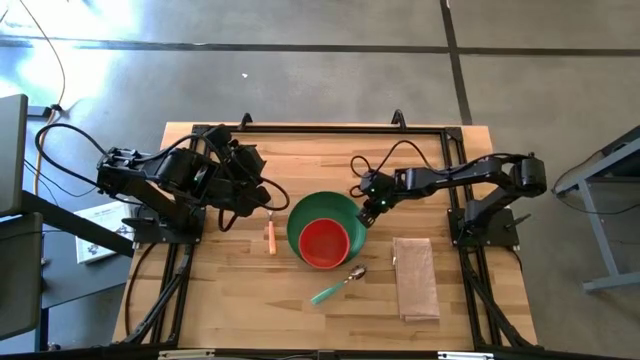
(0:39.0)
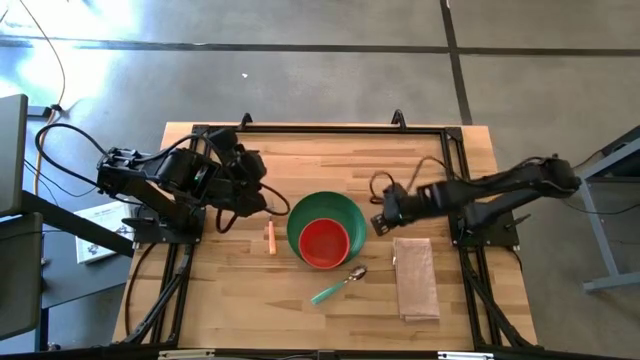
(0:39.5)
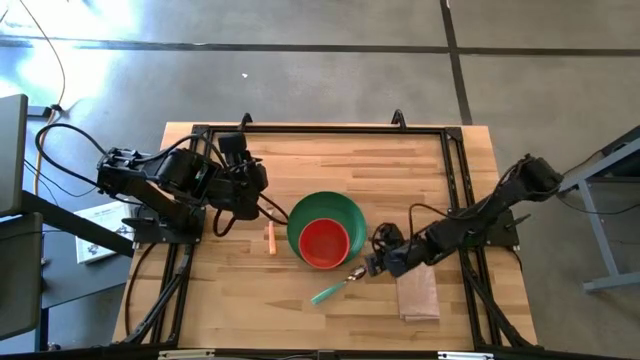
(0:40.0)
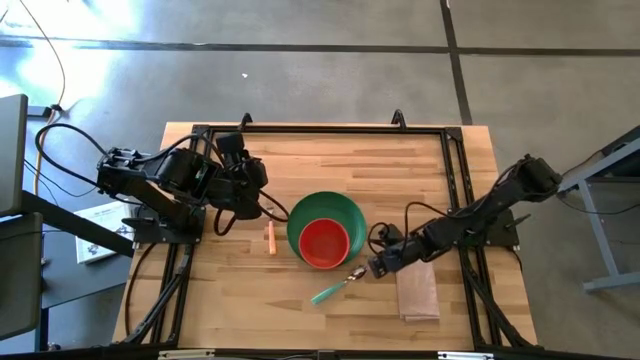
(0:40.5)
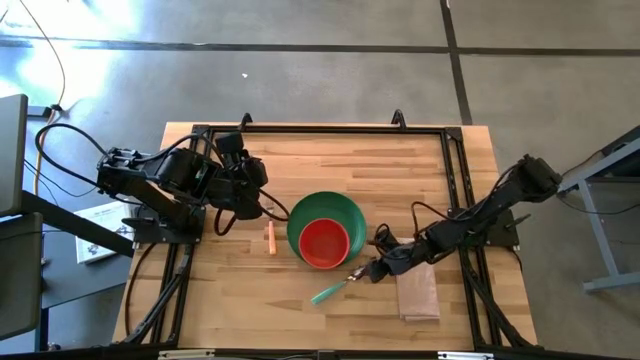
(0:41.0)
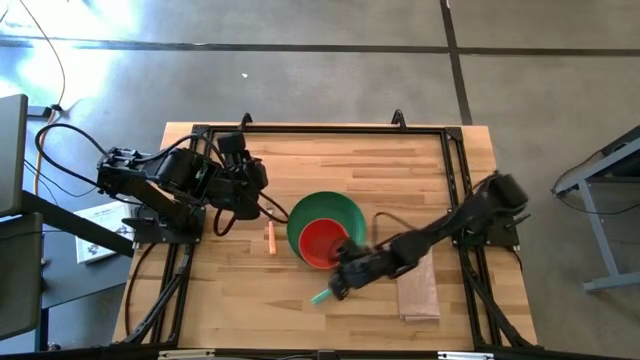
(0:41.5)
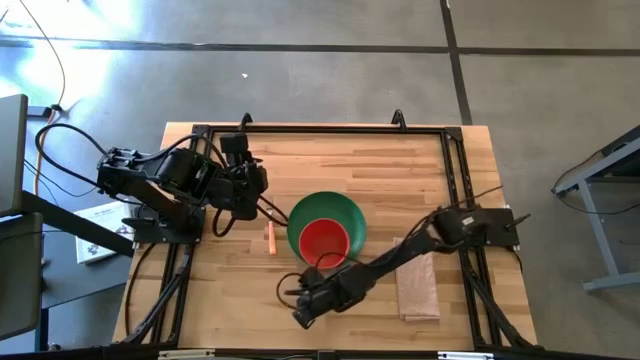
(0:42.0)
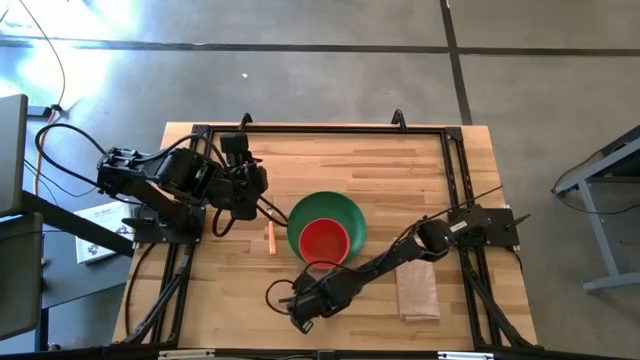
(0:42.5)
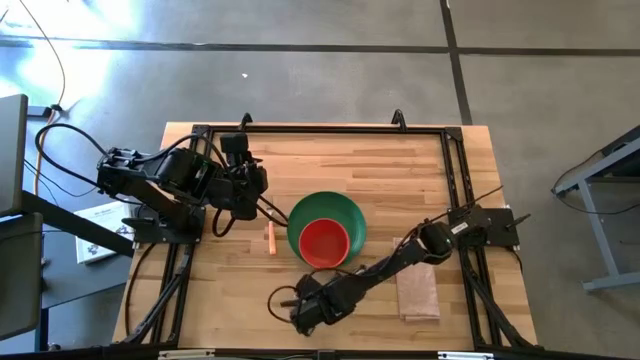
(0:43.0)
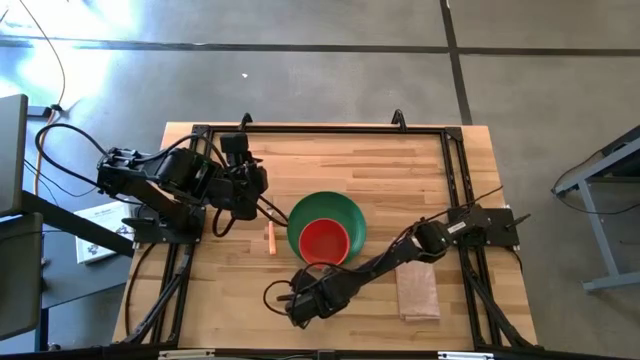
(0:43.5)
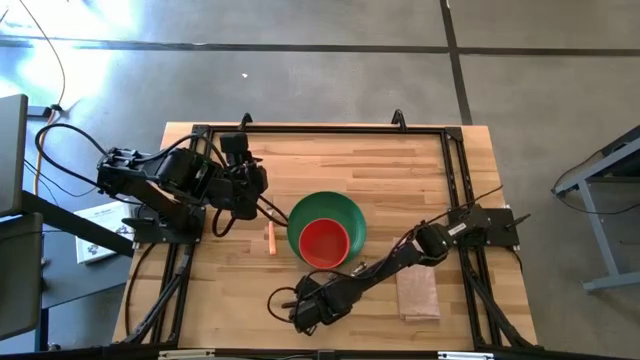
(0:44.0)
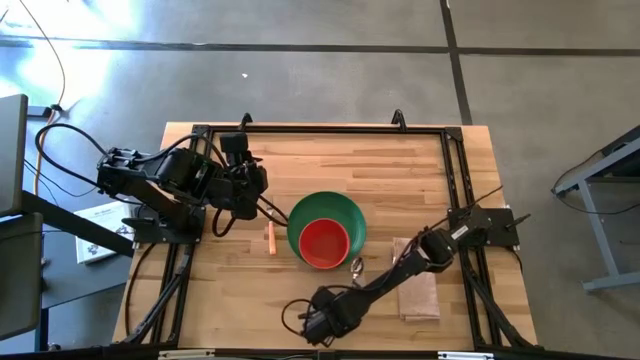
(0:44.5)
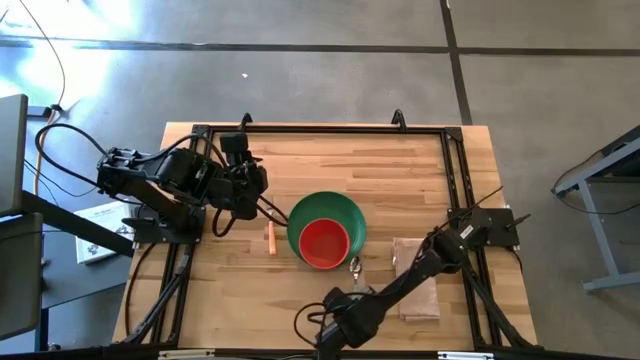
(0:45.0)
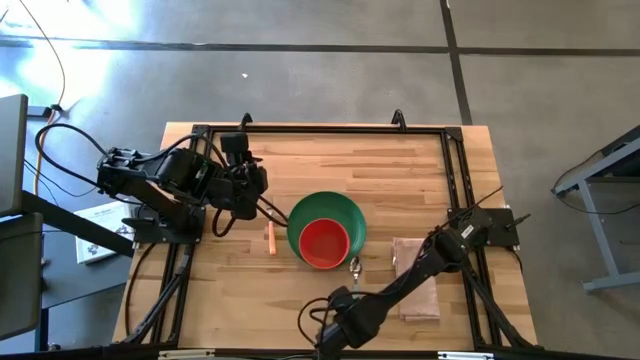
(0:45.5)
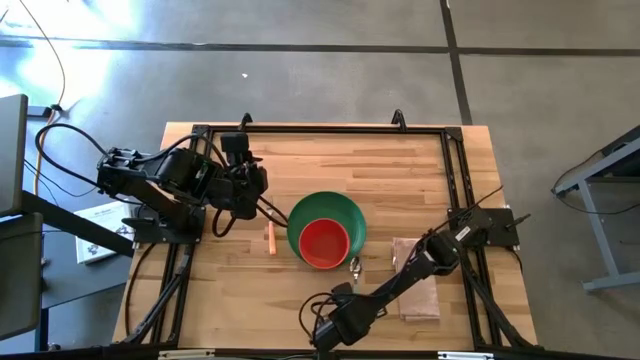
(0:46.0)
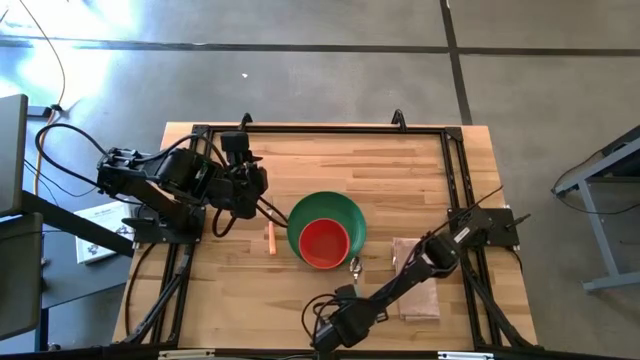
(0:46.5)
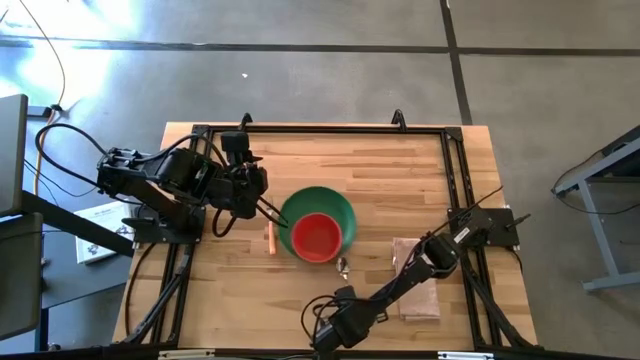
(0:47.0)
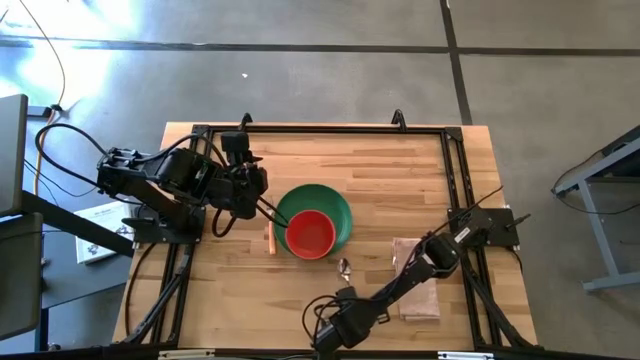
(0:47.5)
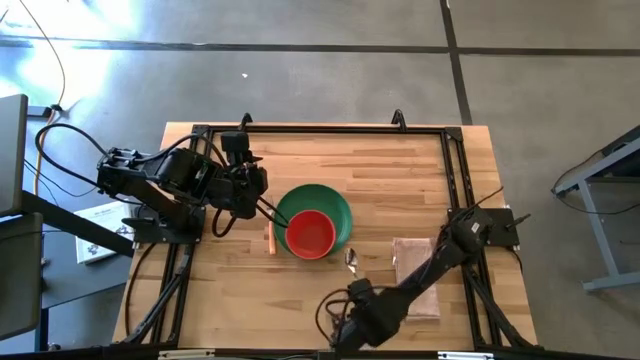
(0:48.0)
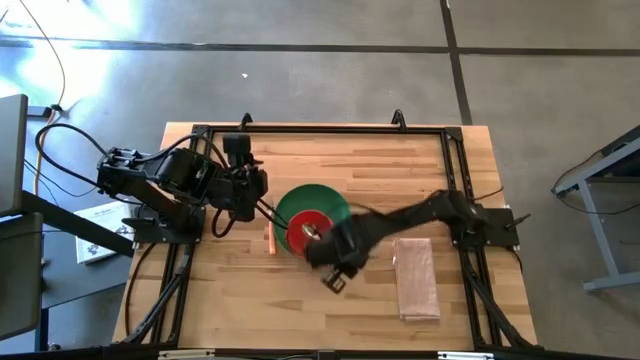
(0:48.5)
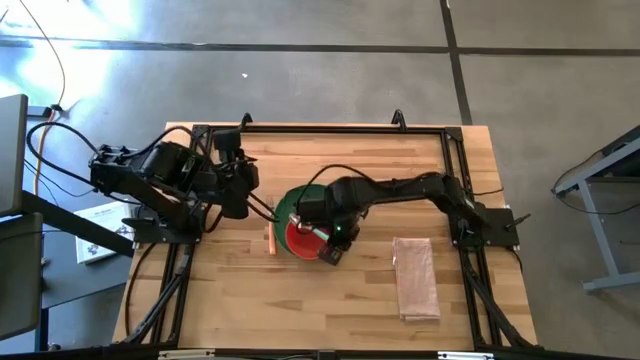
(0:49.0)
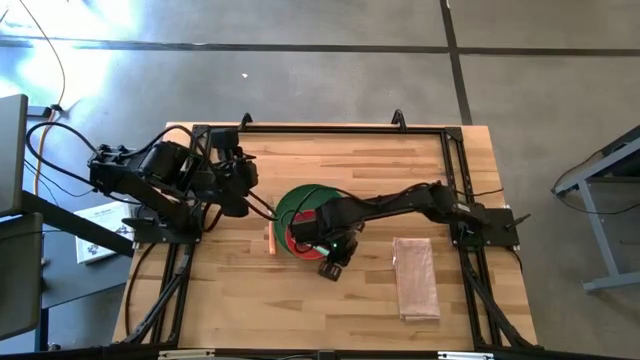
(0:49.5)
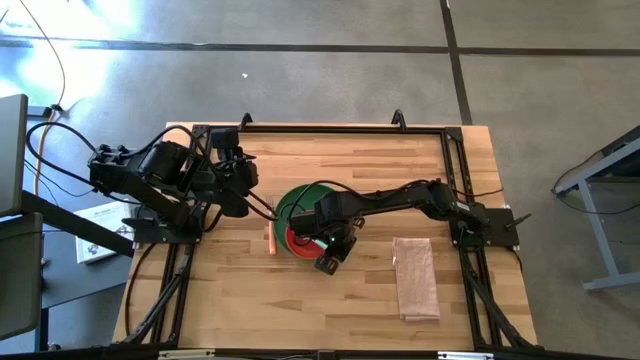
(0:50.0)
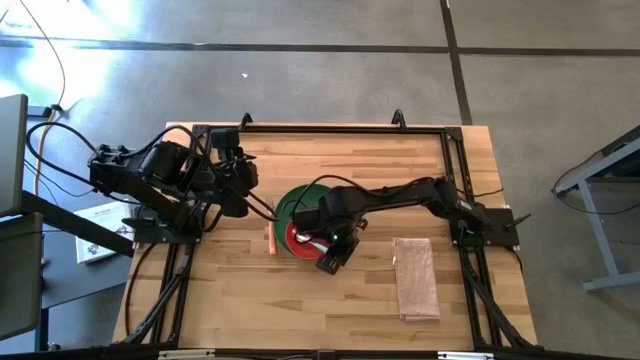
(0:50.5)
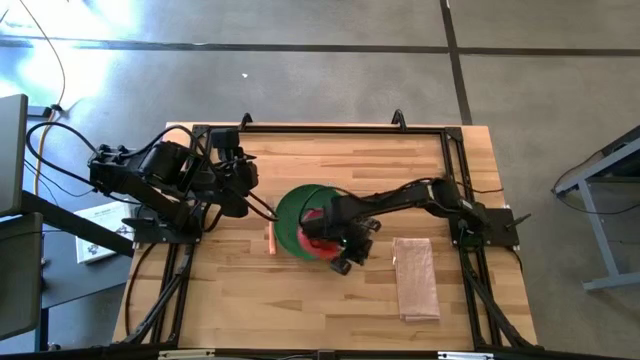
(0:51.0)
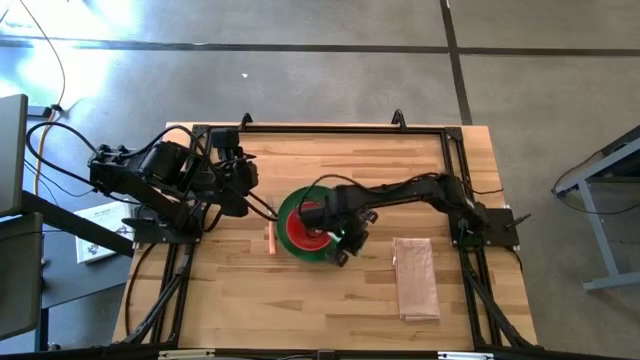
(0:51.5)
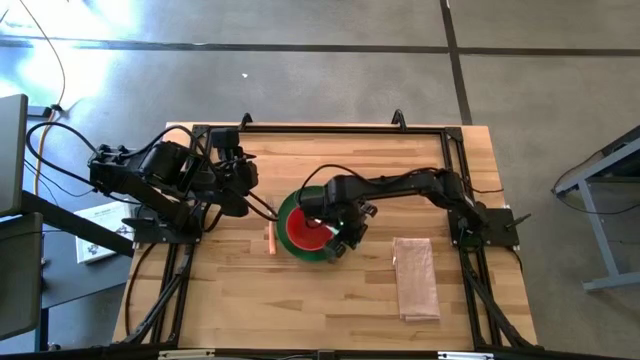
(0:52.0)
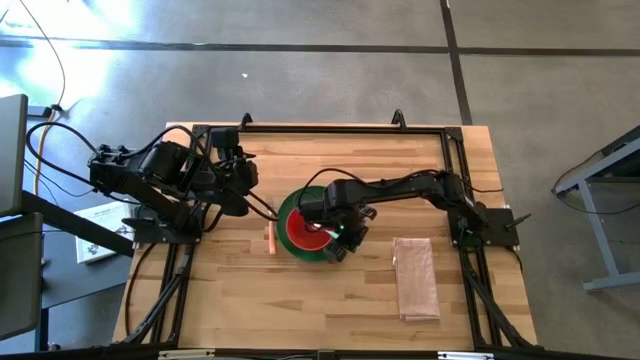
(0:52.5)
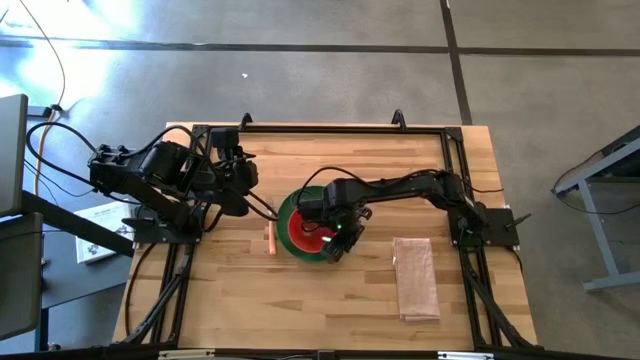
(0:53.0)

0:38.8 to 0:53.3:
Task: Set table place
Put the spoon into the orange bowl

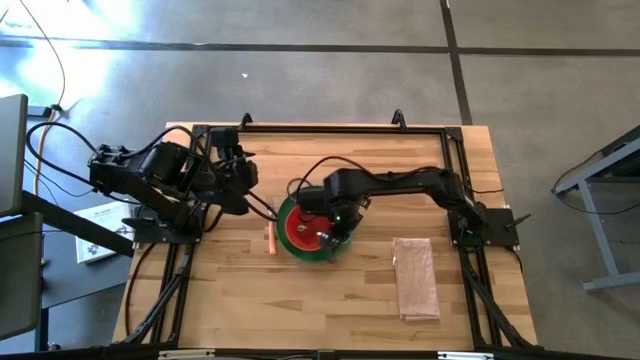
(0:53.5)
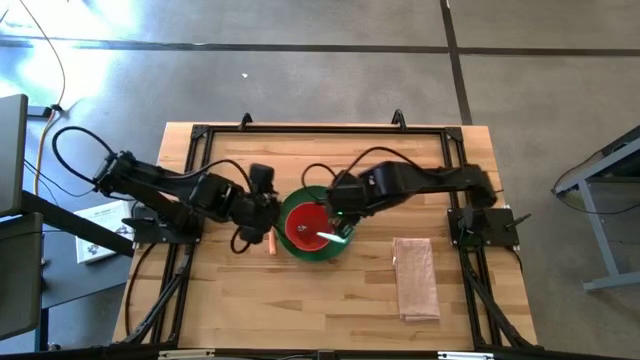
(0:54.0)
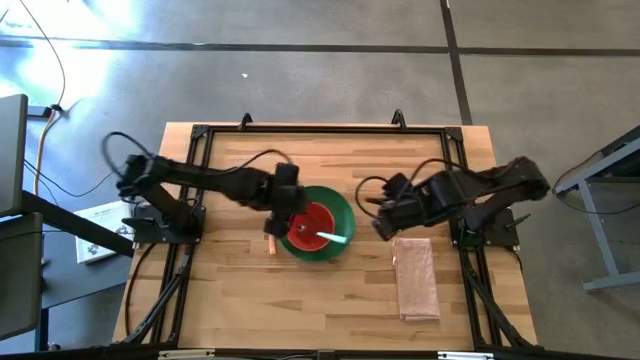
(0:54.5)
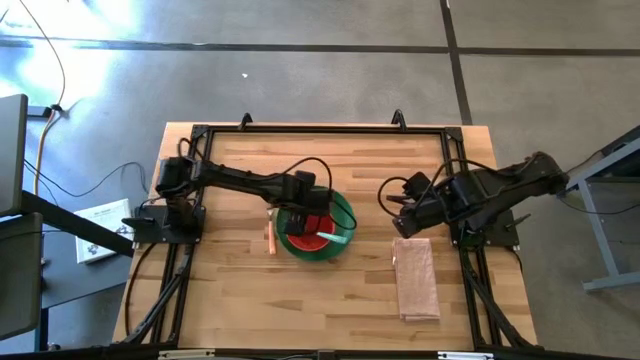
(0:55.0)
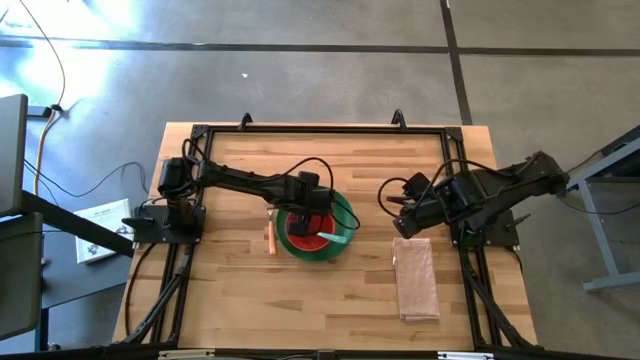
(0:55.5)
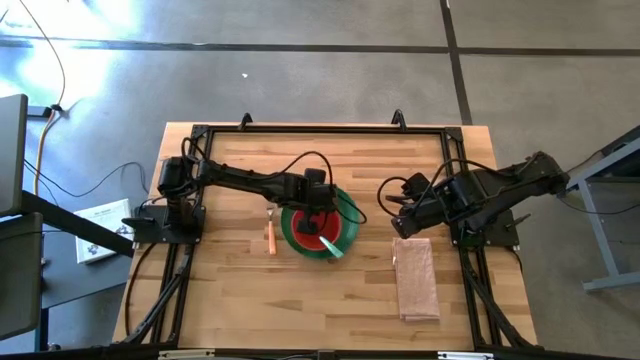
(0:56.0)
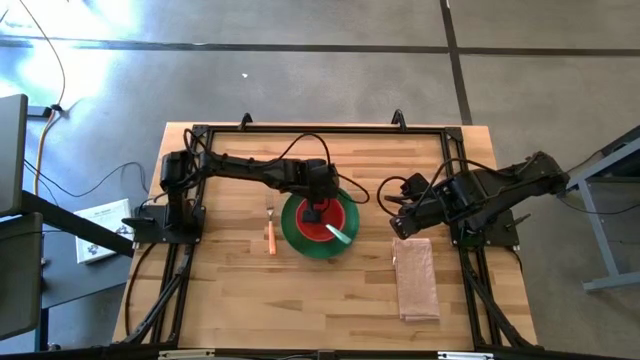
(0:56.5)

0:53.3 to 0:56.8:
Adjust the orange bowl

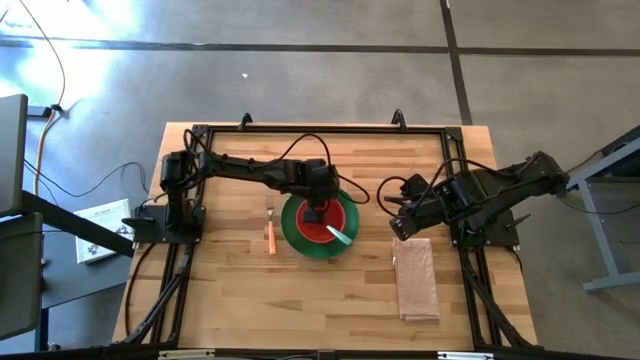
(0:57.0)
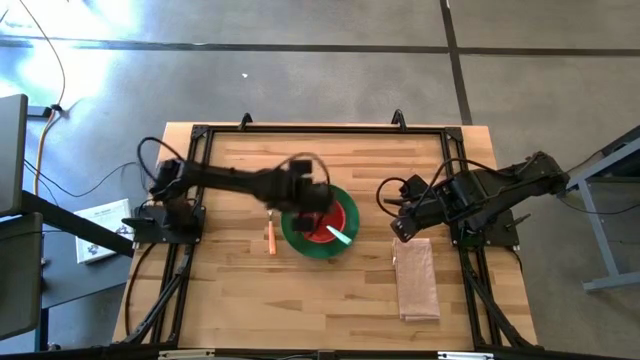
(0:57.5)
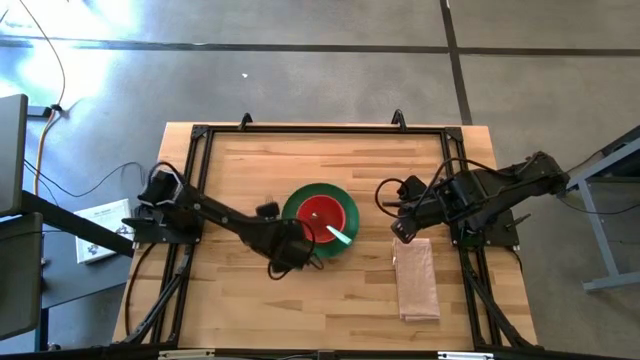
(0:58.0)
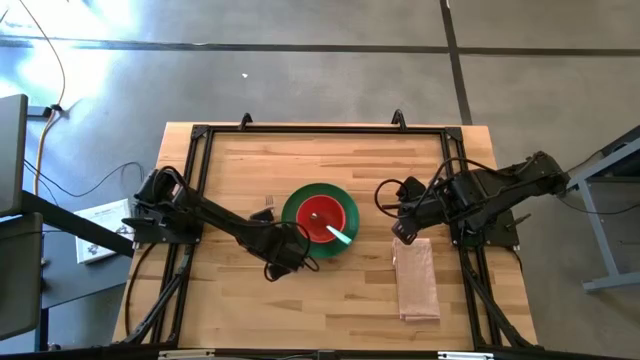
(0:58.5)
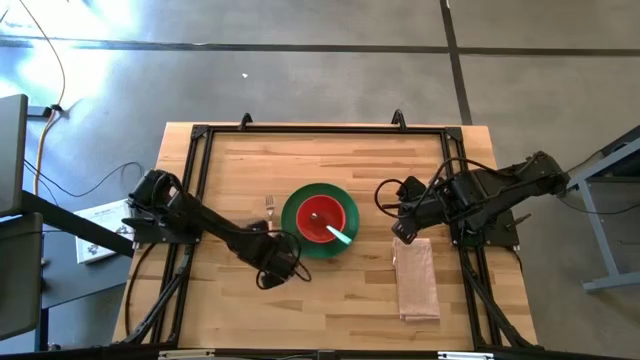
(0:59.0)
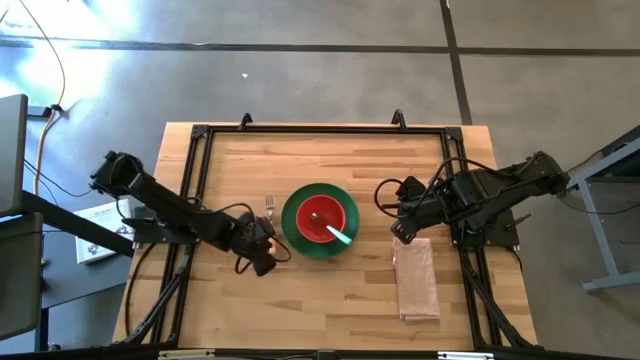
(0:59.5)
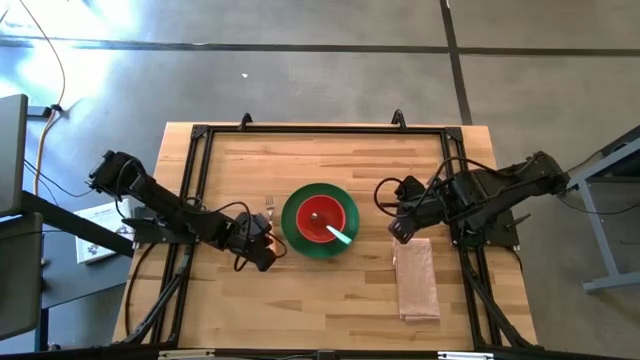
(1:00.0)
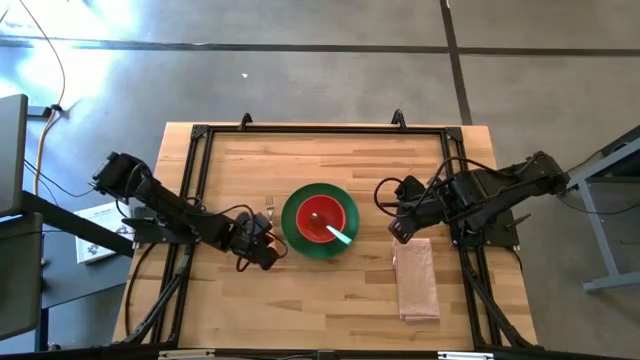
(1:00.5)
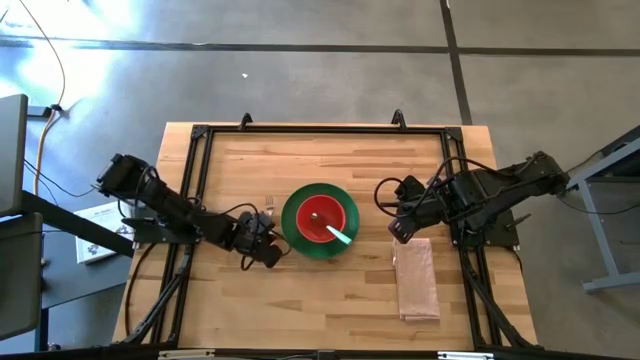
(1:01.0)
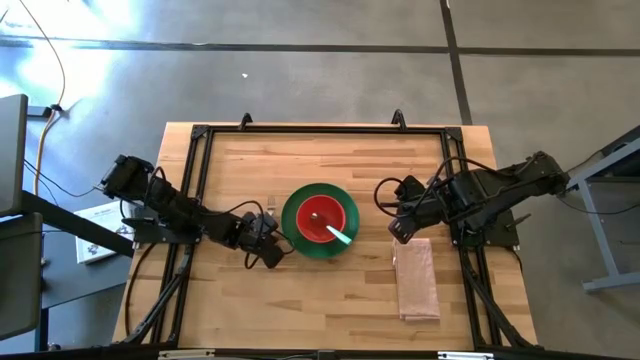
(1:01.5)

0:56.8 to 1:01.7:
Adjust the light orange fork
